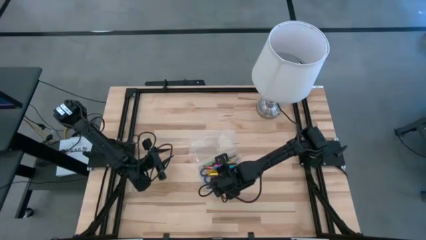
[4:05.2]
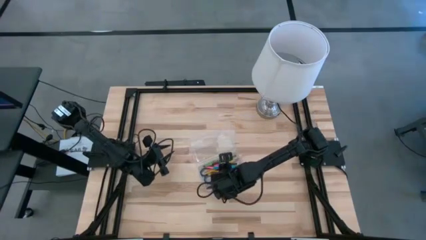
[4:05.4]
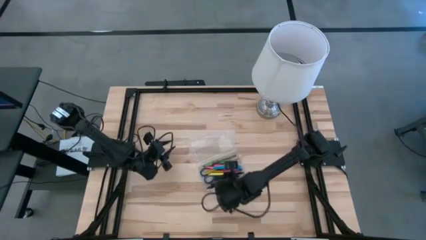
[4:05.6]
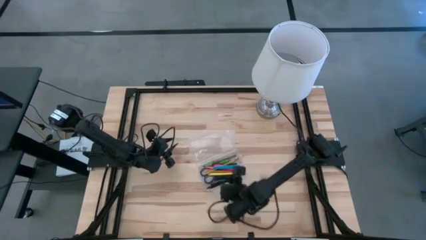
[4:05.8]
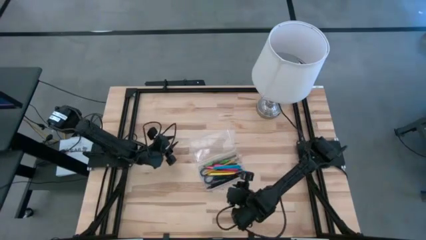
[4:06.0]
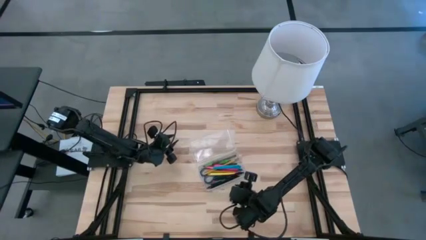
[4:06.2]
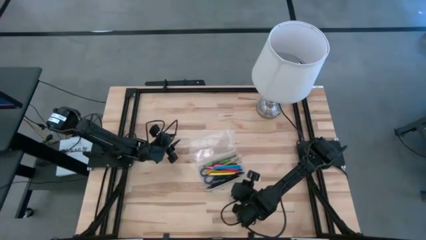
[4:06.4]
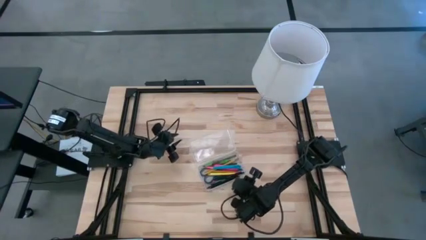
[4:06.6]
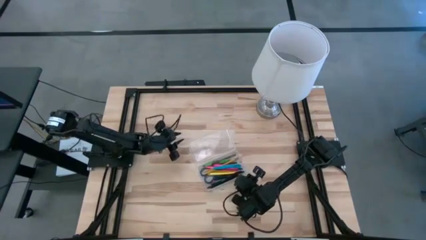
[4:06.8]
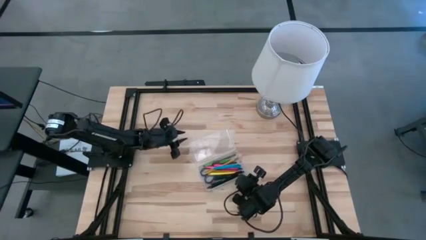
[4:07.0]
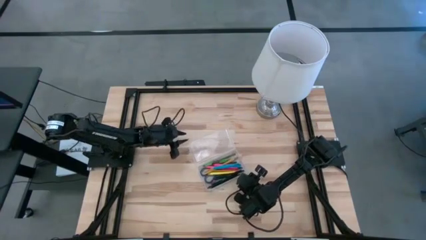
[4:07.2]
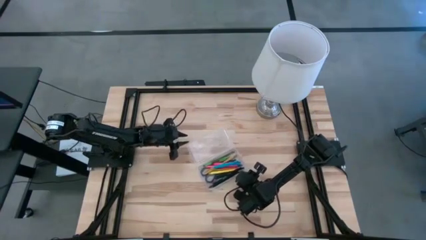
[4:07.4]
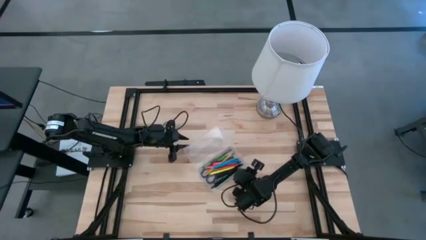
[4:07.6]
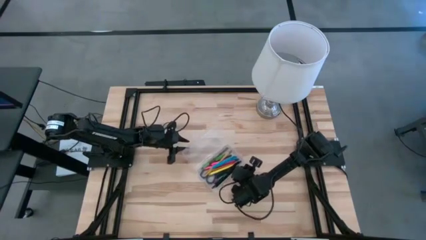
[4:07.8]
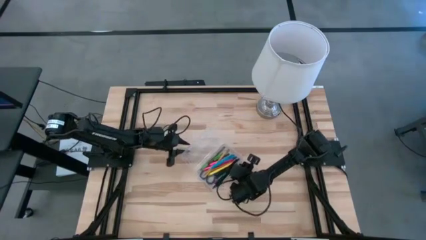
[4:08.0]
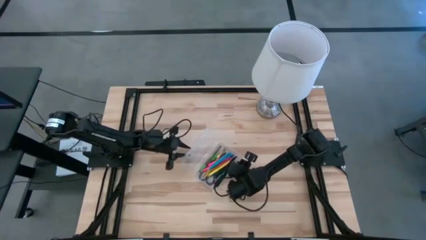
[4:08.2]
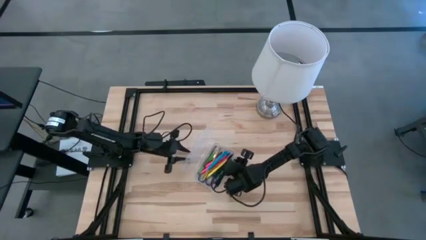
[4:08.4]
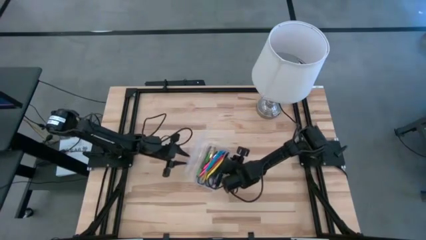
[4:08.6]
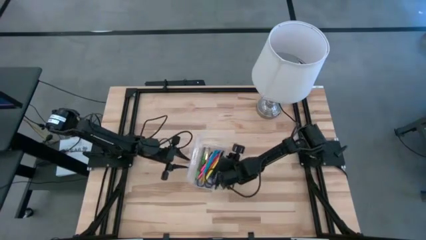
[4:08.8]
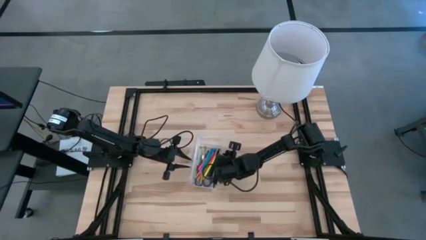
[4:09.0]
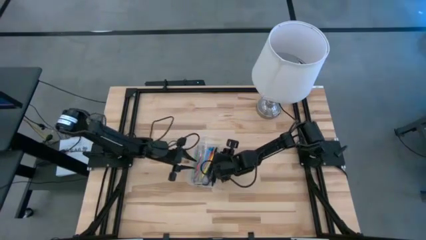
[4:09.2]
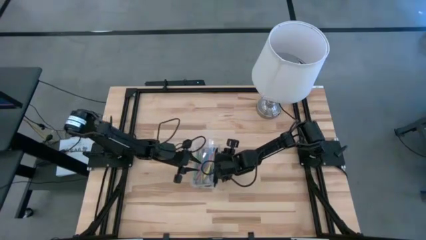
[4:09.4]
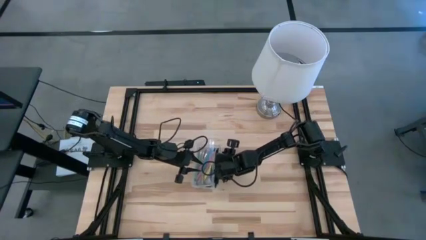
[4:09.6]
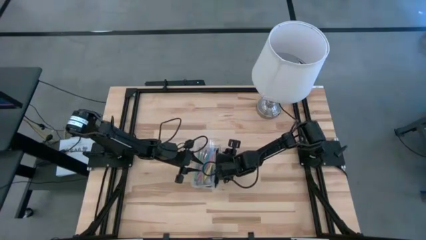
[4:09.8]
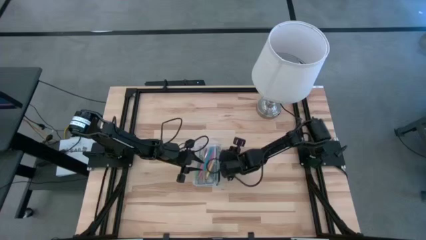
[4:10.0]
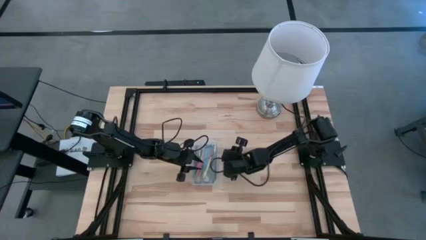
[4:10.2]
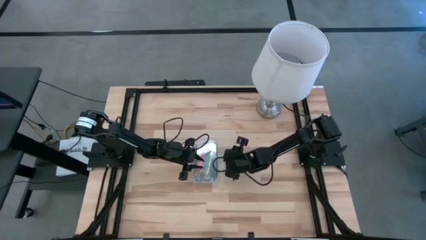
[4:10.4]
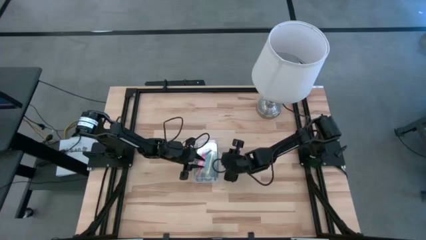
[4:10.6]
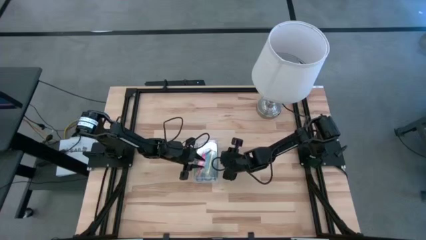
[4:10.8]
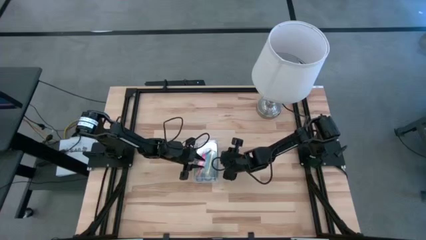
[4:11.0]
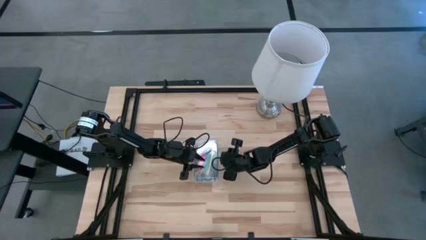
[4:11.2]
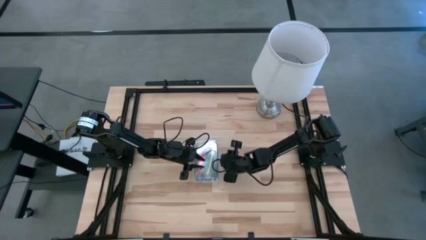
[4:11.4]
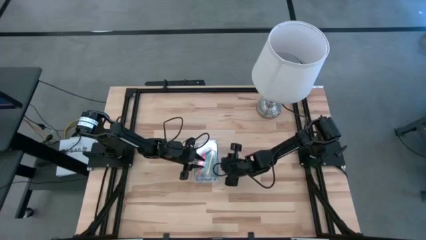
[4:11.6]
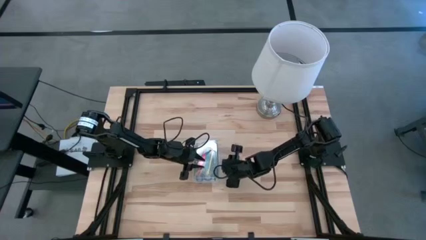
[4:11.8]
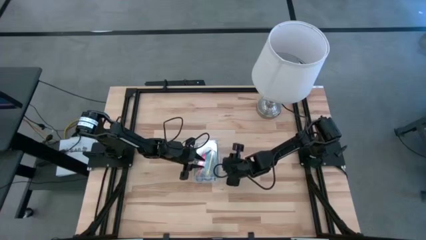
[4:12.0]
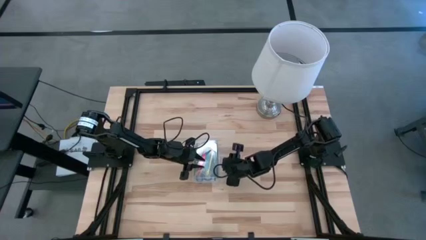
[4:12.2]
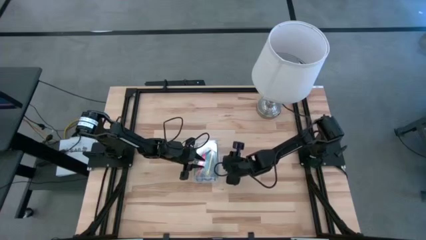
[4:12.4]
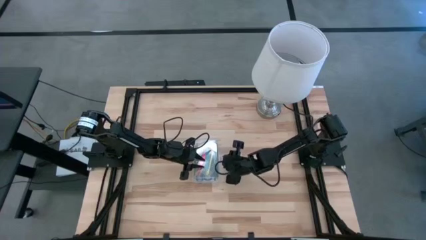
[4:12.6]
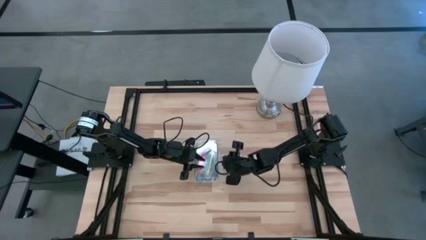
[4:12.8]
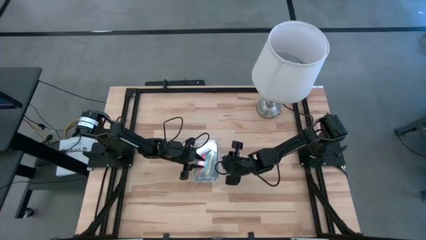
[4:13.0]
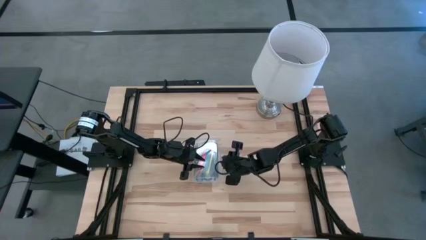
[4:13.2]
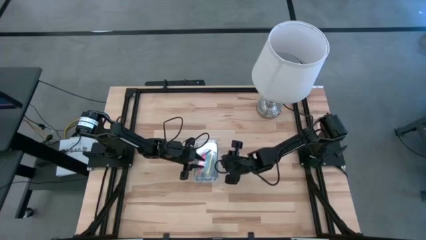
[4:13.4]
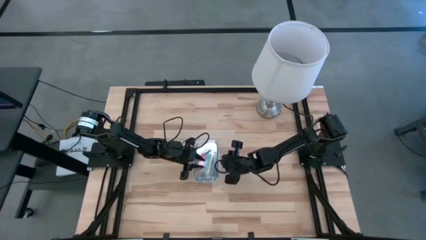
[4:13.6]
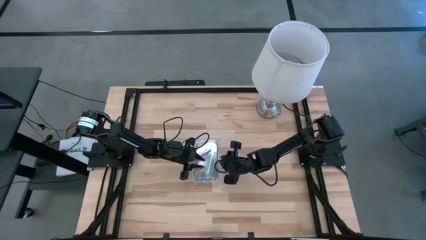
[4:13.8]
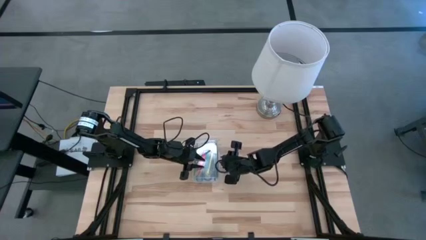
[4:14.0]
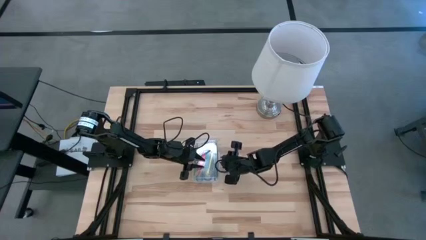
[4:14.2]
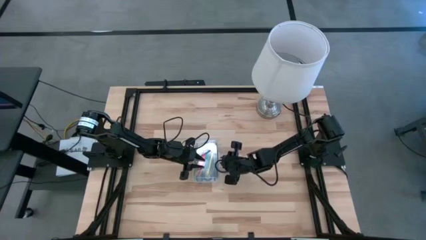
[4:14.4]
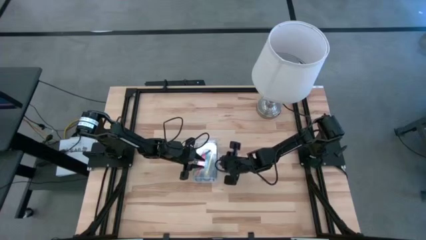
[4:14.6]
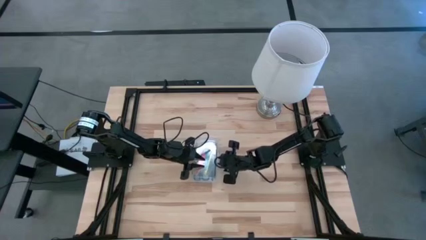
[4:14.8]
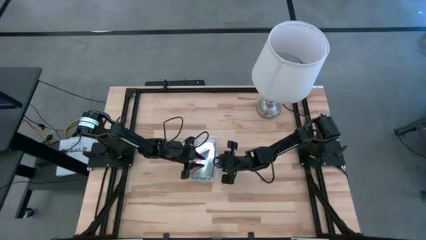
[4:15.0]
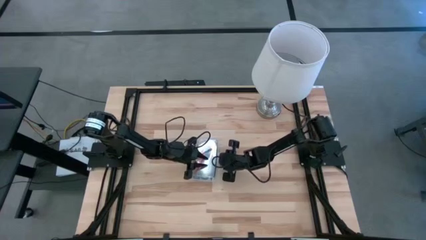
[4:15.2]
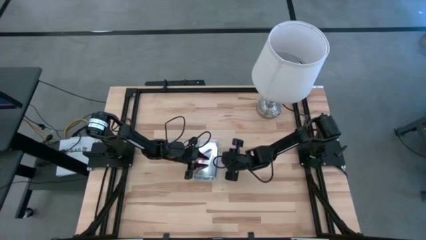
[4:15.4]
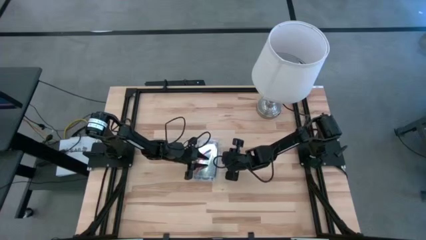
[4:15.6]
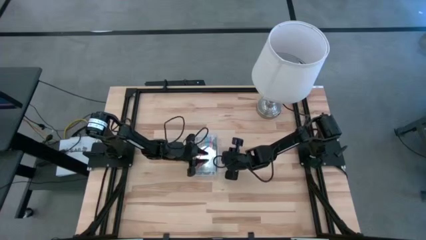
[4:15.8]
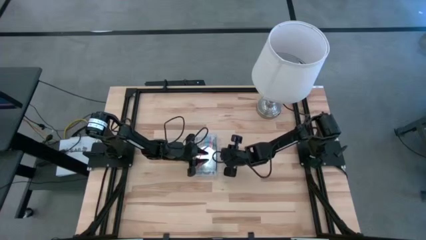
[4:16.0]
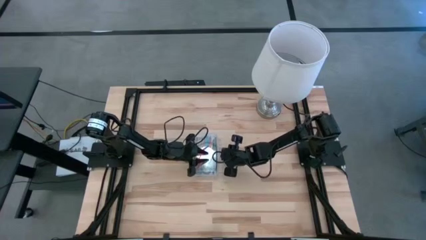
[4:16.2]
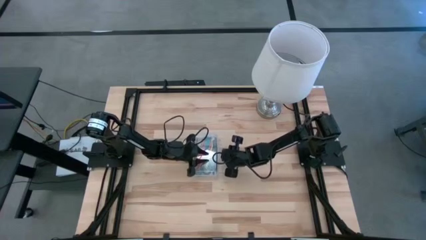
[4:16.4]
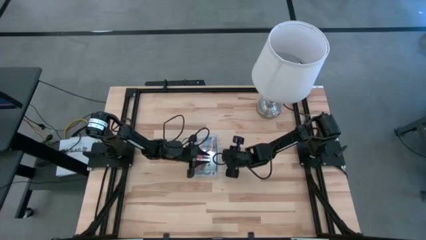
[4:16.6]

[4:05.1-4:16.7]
Task: Pick & place school supplies into a supply box
Close the supply box

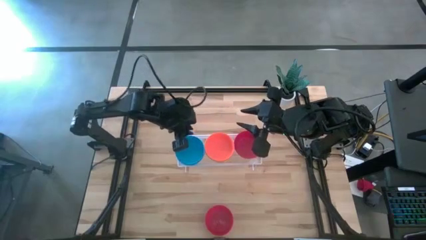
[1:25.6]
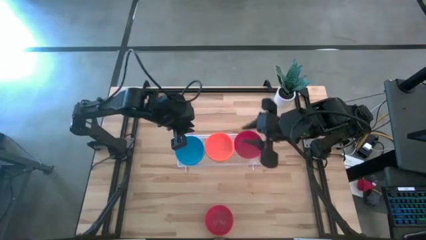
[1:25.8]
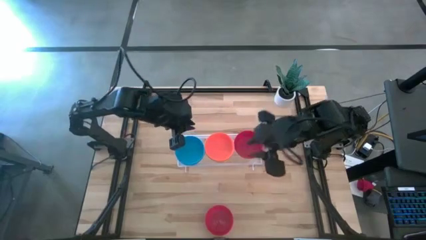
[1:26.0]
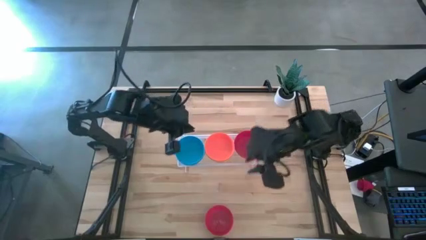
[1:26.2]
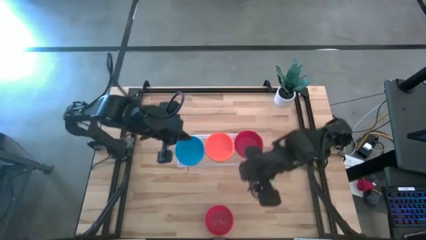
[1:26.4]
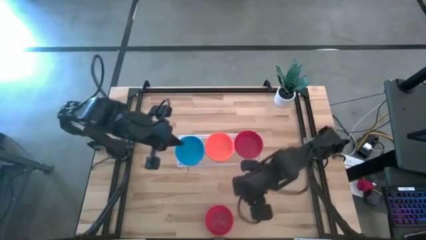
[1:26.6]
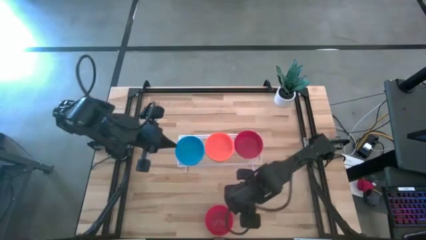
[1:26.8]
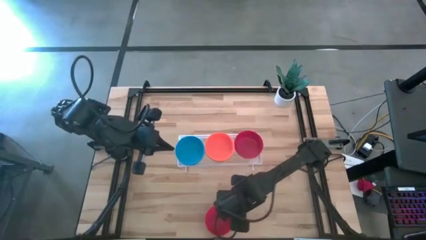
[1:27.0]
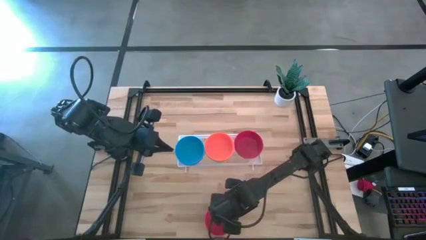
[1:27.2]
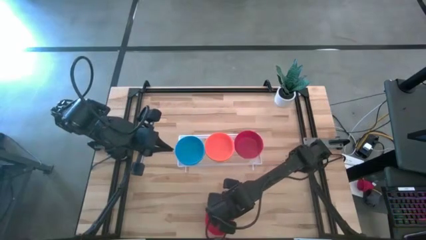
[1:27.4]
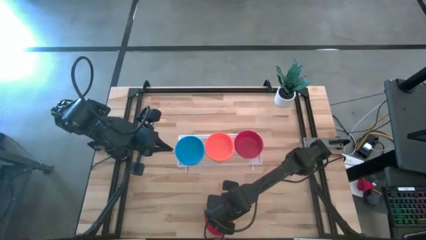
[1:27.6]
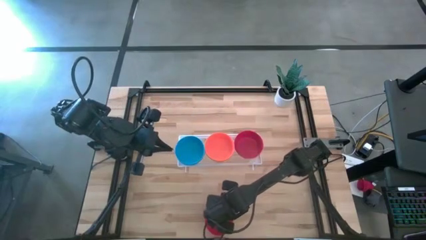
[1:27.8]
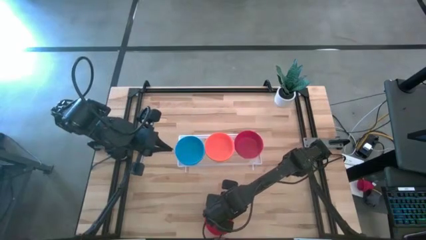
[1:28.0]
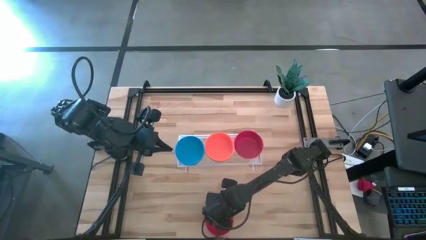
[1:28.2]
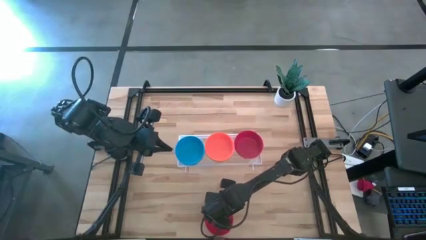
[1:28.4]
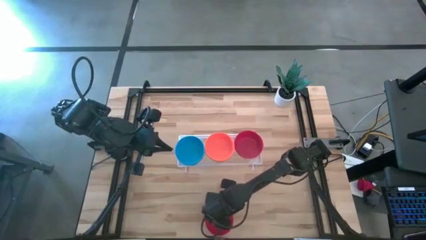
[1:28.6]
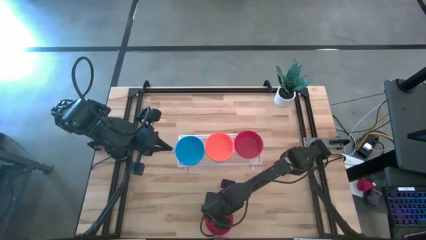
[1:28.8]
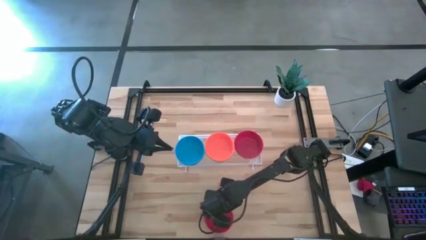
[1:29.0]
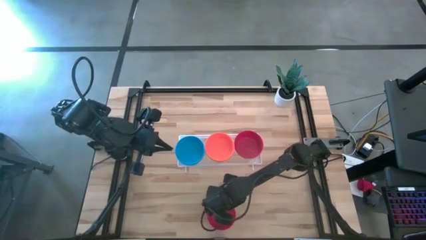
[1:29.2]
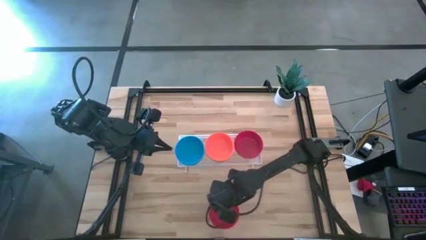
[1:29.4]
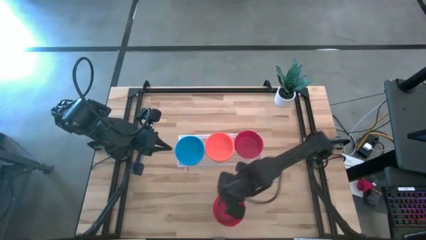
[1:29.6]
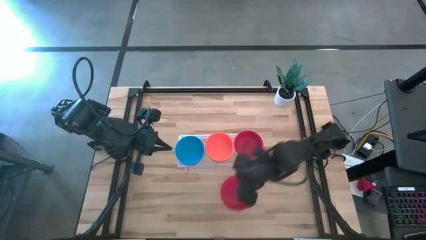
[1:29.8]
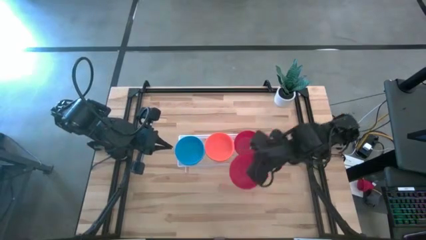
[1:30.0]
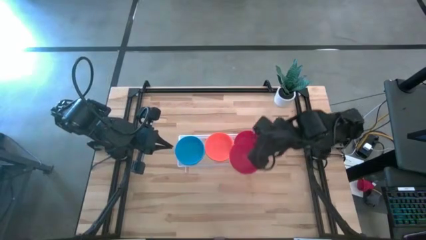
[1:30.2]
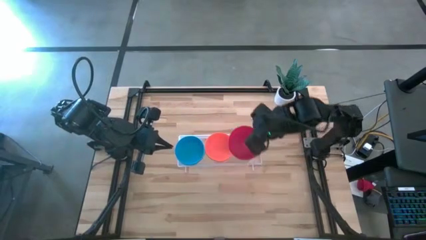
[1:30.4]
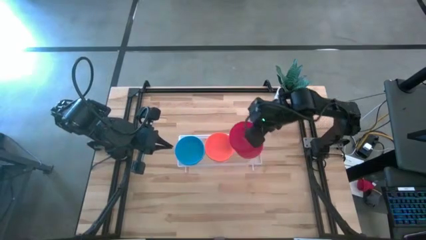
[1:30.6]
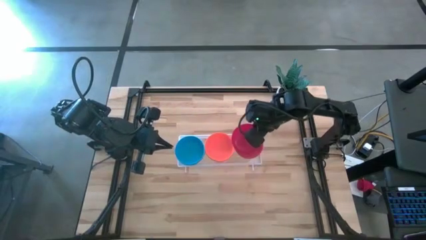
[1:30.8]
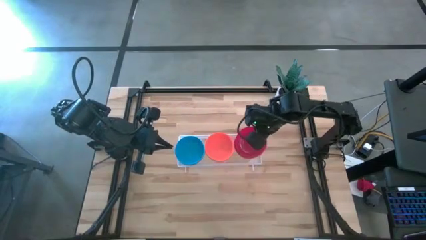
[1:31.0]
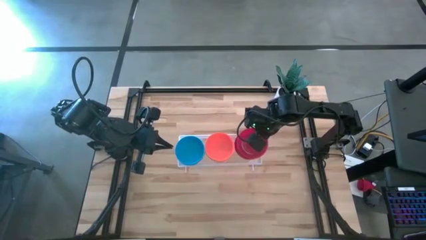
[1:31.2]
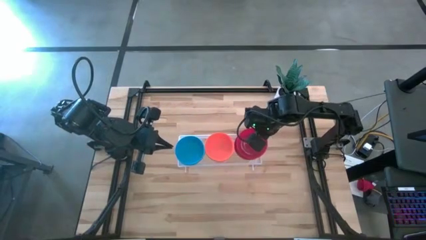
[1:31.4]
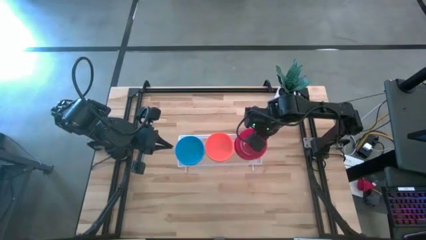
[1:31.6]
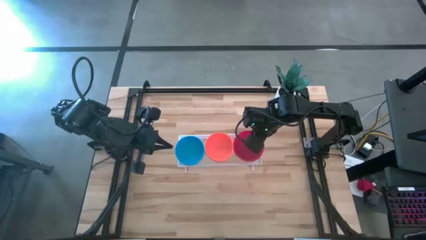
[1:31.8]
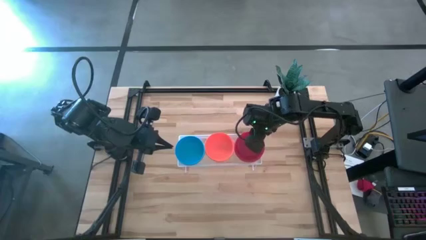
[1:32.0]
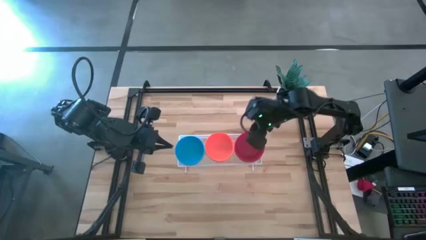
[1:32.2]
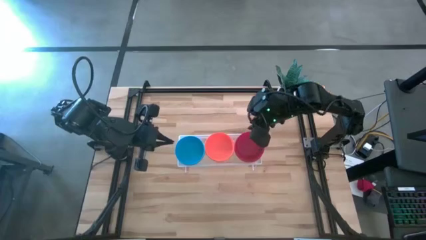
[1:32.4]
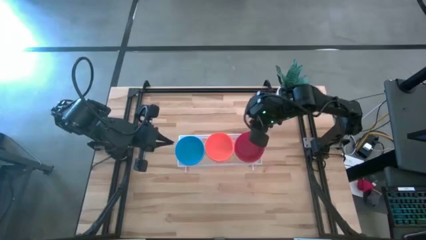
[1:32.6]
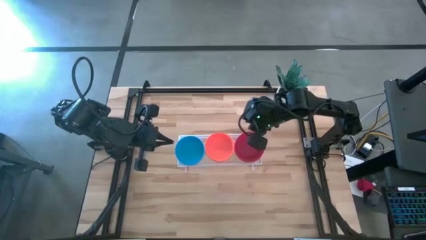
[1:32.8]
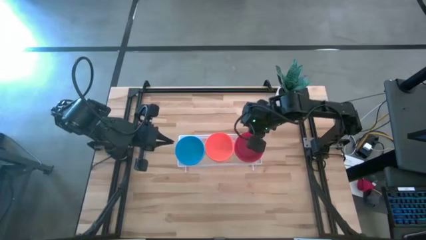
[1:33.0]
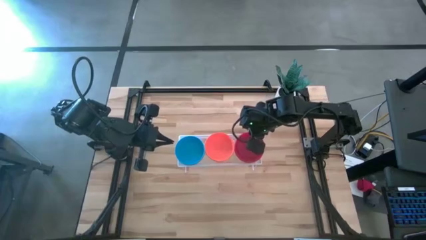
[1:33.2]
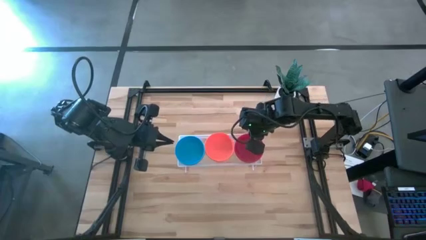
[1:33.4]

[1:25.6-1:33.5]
Task: Pick & Place Mini bowls
Stack the red bowl on the red bowl on the shelf
